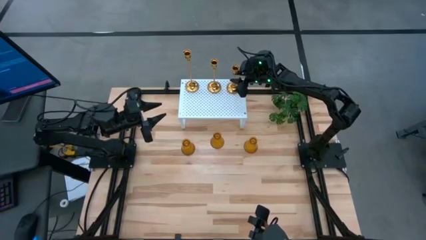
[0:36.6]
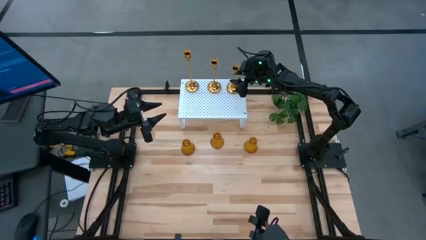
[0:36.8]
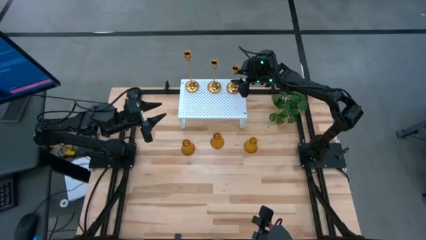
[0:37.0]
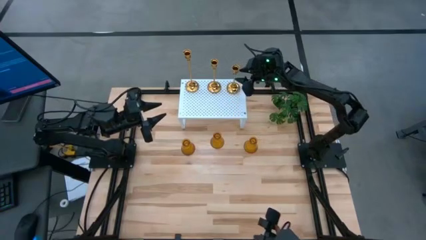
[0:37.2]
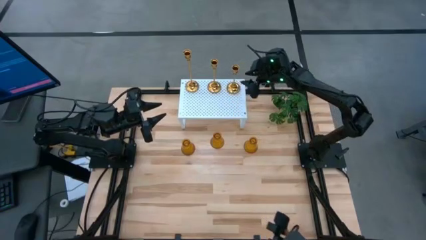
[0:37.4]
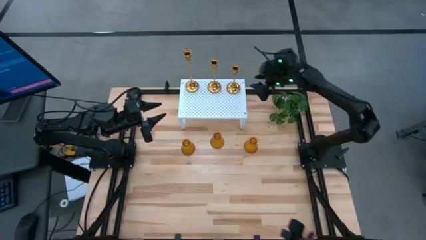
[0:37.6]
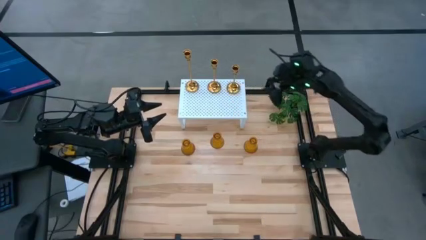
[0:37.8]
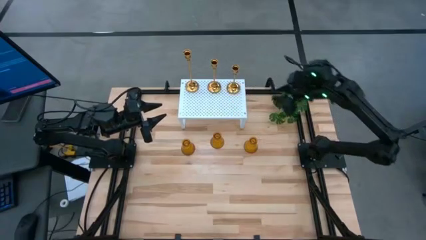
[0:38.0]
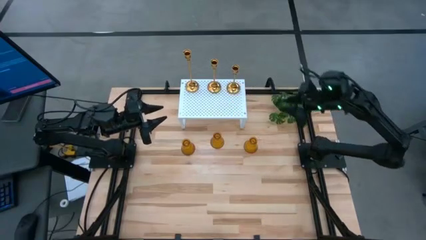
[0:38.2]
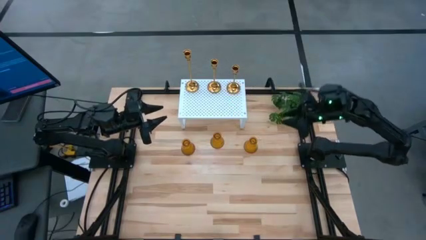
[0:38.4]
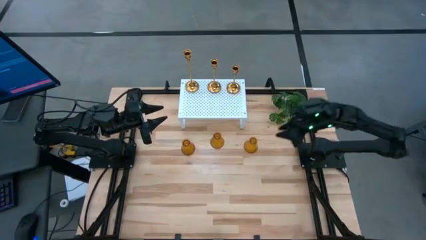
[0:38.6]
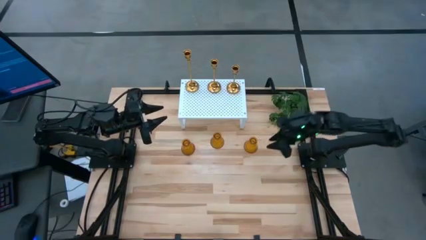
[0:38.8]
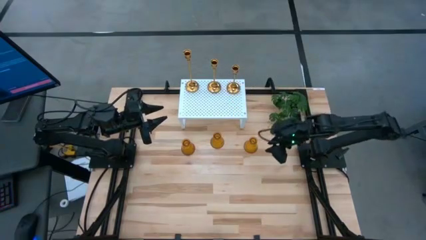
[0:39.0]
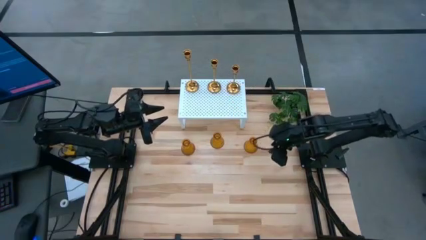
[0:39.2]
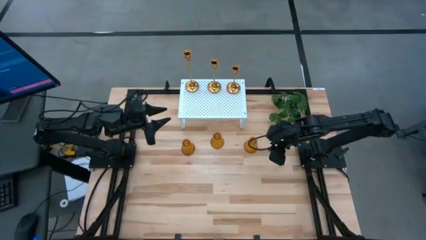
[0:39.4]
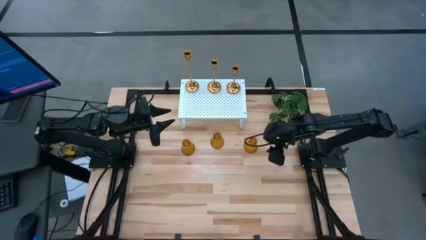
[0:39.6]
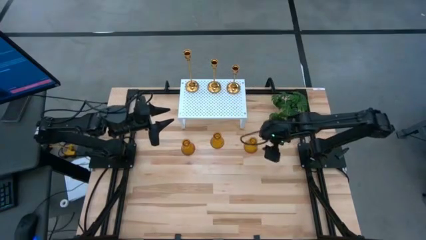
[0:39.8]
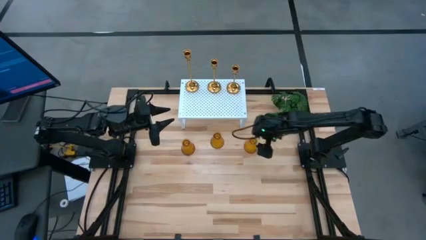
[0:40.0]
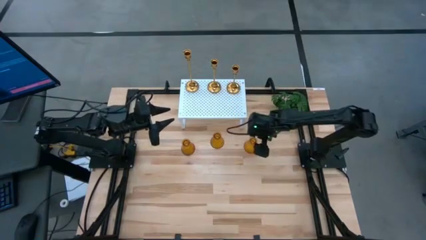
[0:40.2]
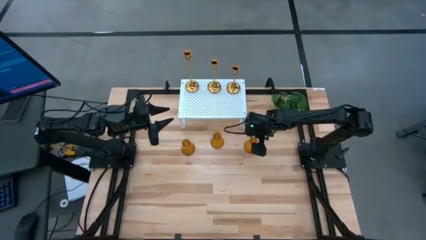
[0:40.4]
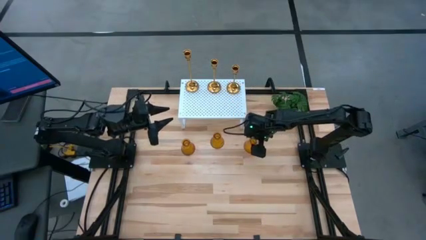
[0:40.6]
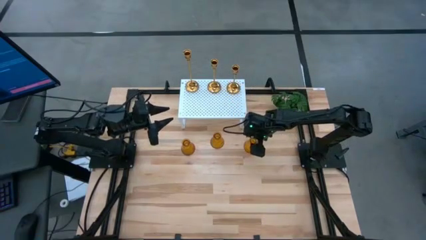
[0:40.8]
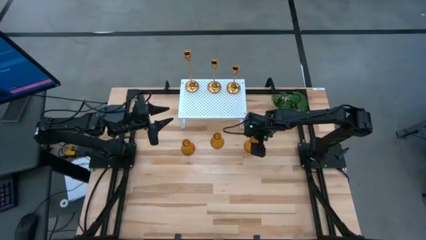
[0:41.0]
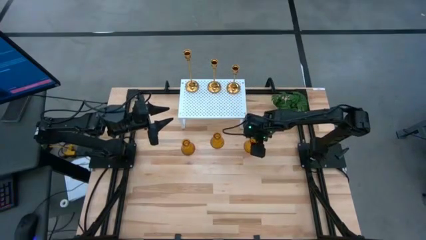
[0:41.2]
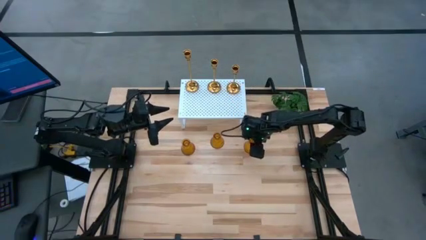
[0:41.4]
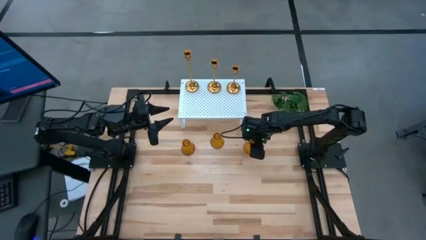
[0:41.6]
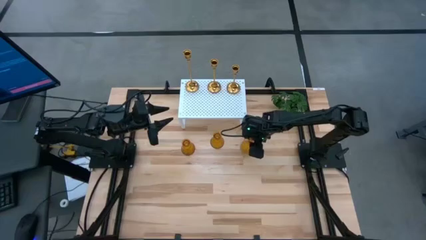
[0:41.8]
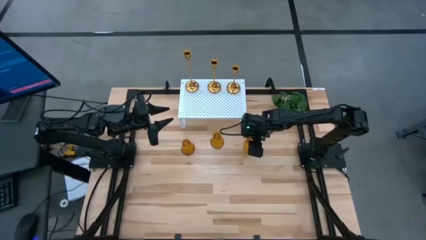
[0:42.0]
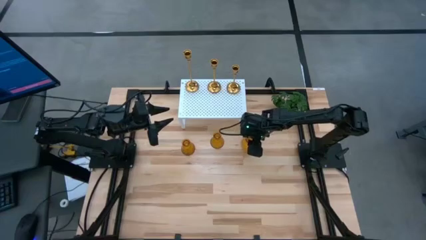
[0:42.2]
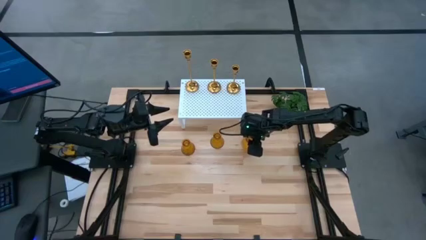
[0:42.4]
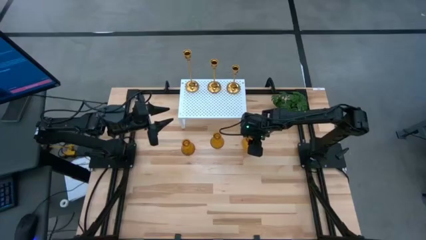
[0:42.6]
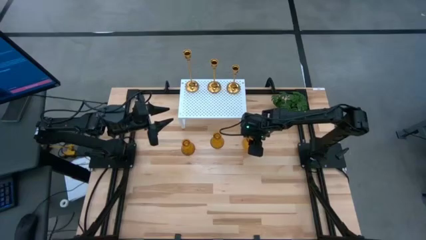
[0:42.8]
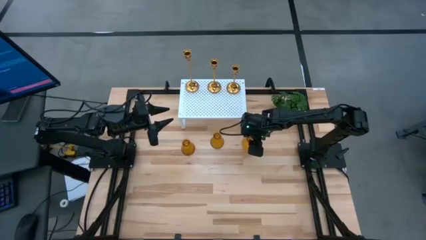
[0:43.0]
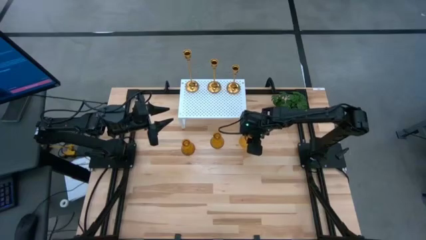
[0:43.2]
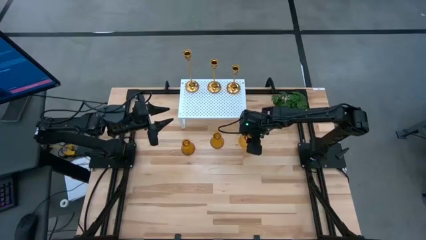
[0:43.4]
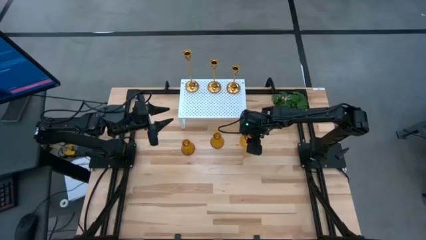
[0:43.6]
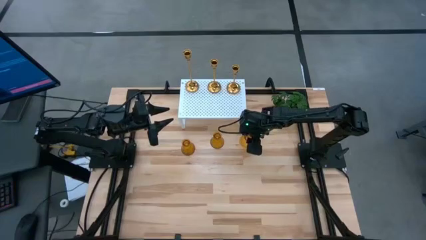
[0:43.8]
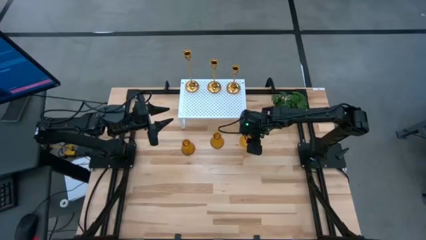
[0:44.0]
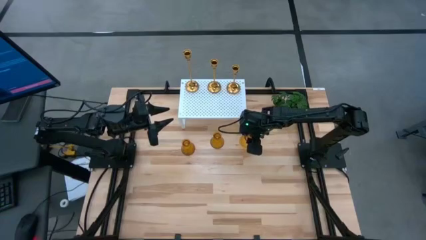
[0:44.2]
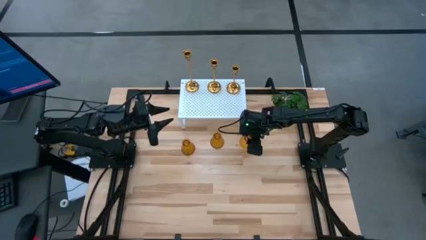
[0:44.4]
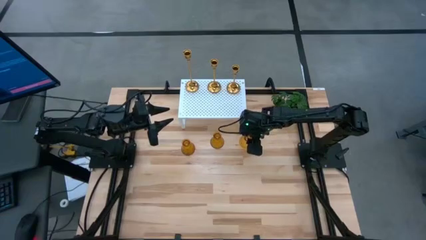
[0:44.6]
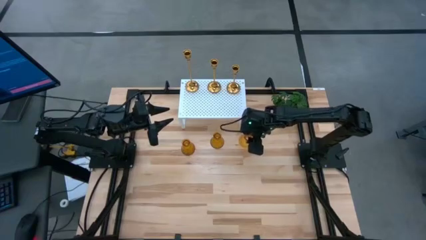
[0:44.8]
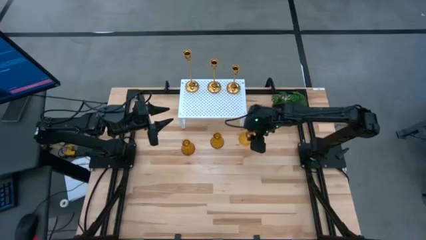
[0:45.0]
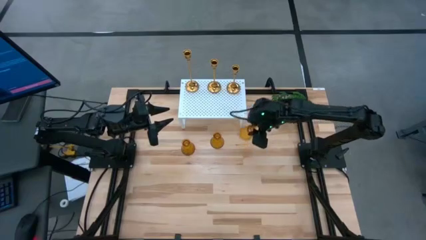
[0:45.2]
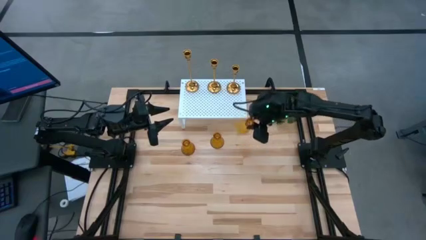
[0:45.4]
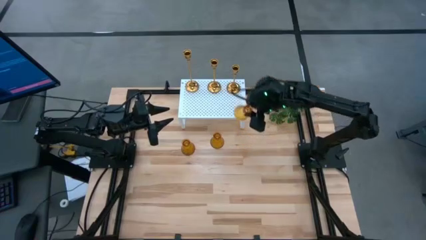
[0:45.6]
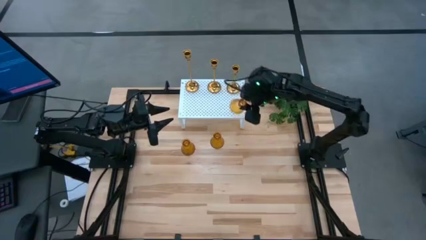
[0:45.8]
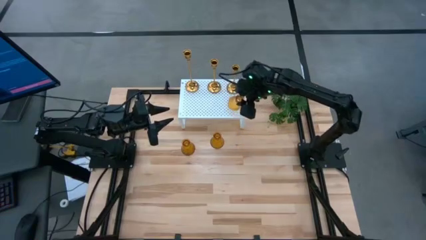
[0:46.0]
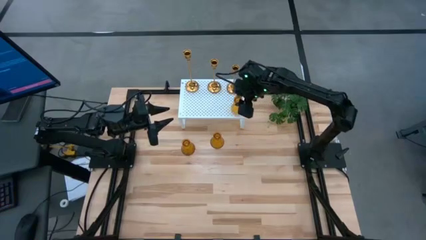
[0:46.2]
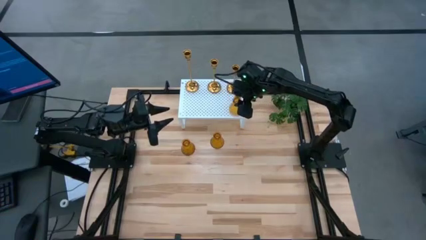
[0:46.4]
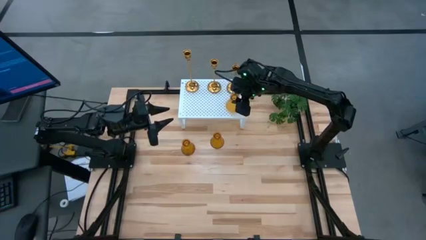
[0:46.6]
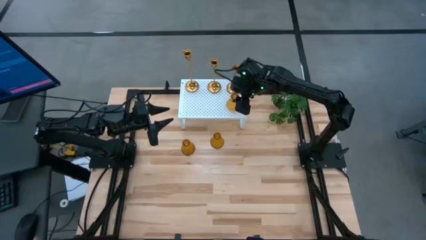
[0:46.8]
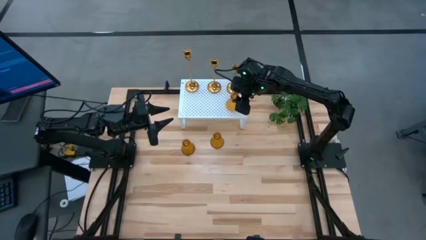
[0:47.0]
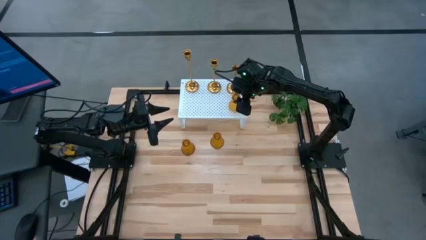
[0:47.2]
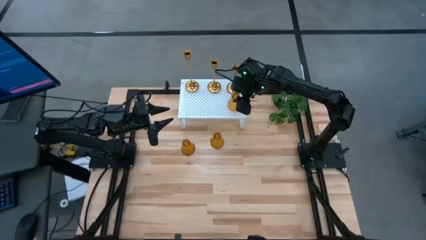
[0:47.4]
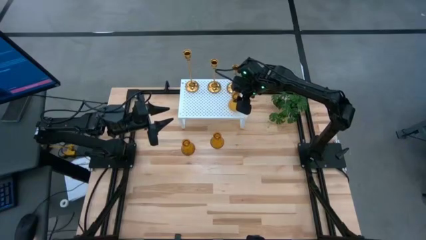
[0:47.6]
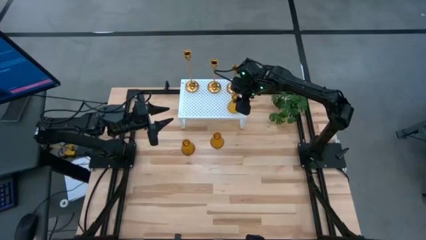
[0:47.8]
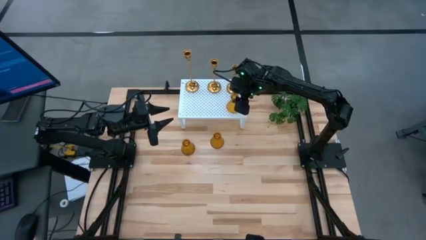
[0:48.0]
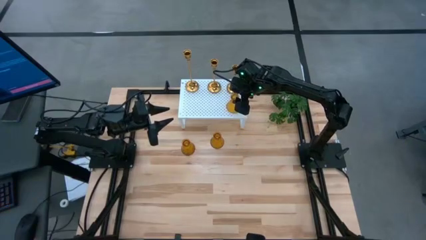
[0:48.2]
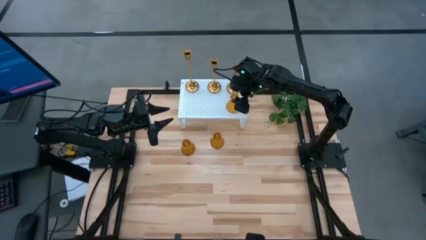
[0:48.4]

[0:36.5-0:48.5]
Task: Pick & Place candle stick holders
Put the right yellow glass candle holder on the shelf

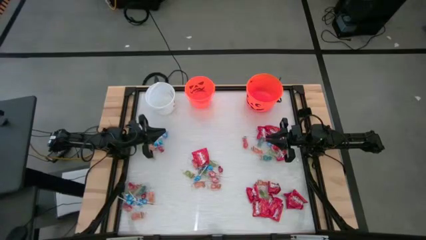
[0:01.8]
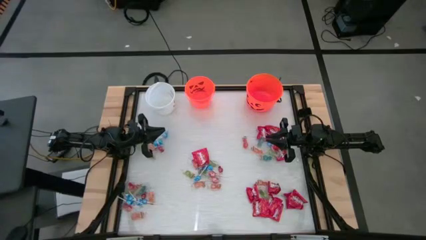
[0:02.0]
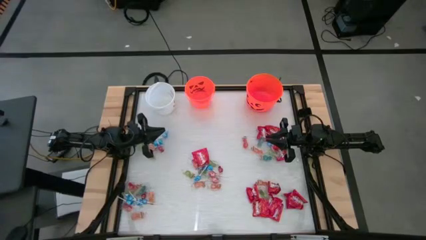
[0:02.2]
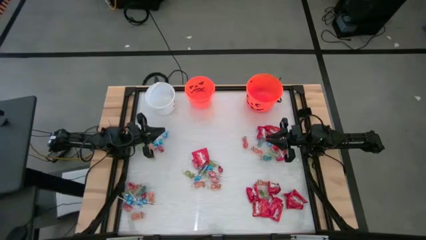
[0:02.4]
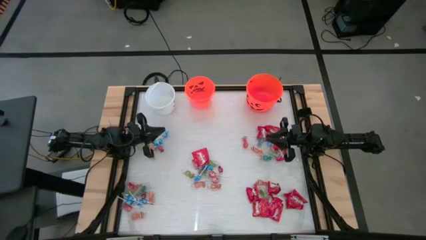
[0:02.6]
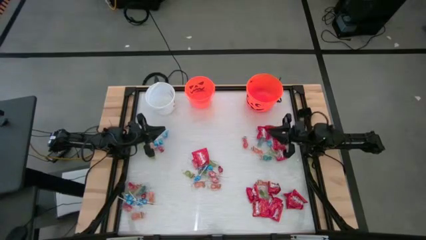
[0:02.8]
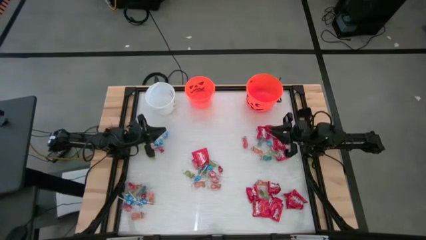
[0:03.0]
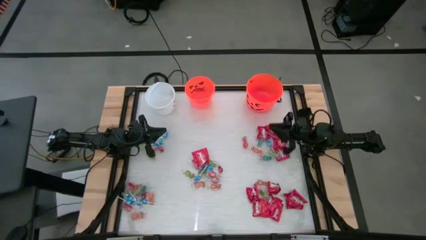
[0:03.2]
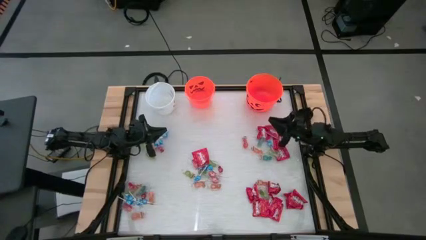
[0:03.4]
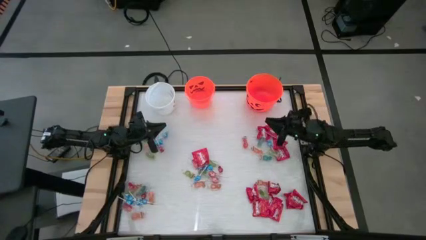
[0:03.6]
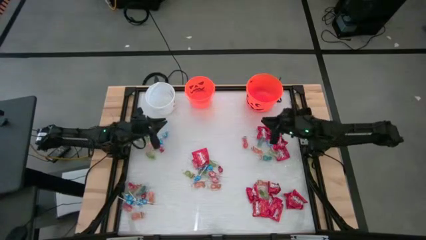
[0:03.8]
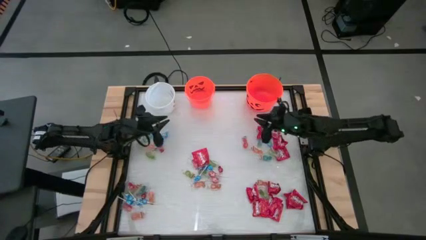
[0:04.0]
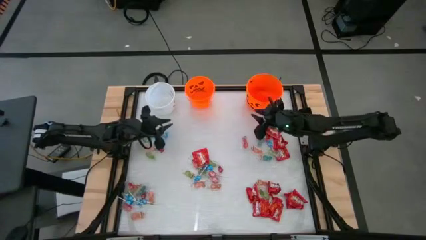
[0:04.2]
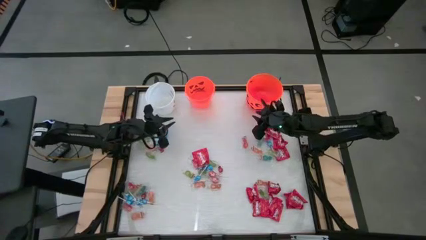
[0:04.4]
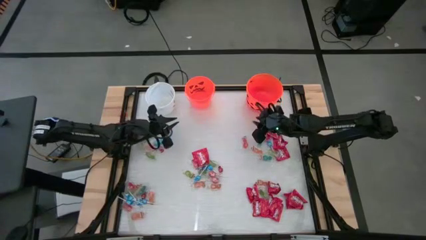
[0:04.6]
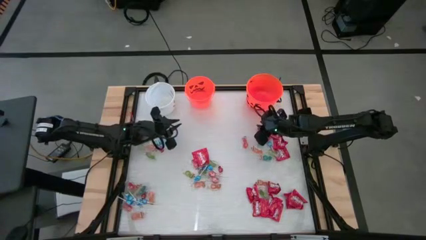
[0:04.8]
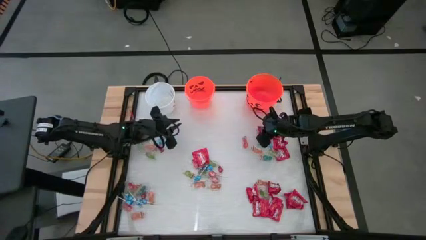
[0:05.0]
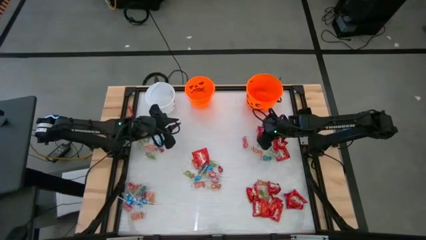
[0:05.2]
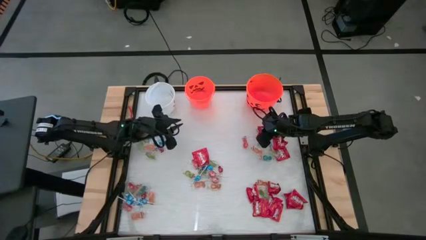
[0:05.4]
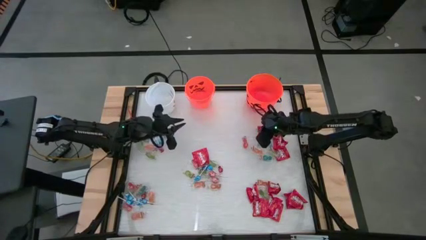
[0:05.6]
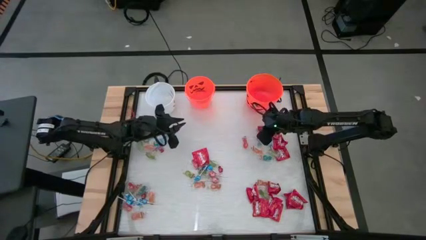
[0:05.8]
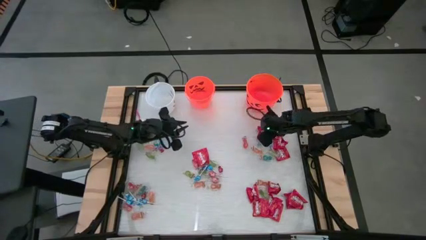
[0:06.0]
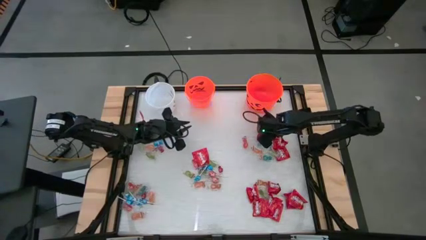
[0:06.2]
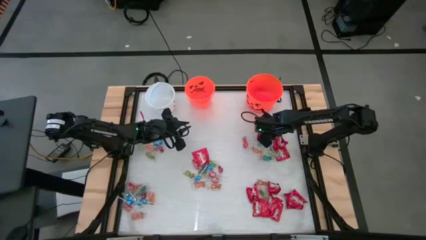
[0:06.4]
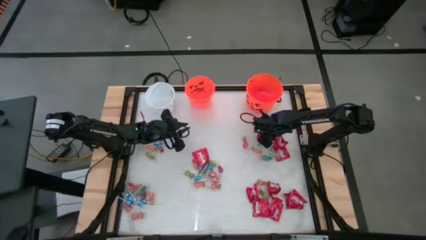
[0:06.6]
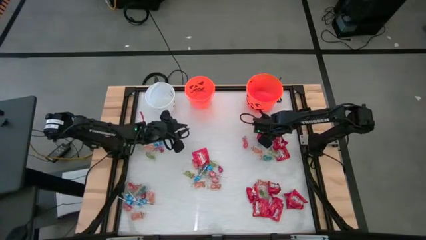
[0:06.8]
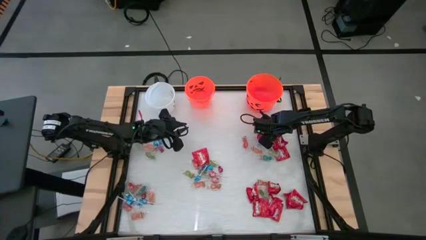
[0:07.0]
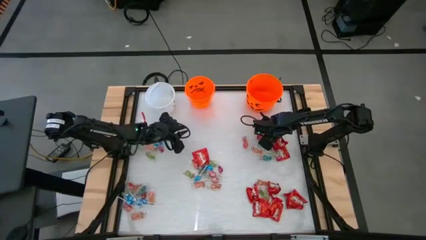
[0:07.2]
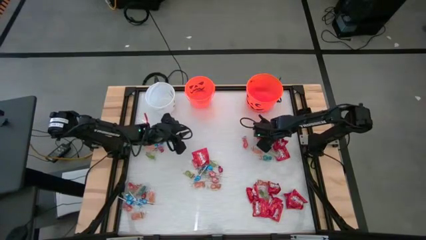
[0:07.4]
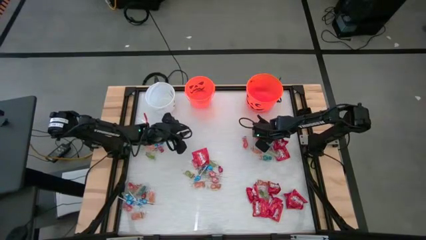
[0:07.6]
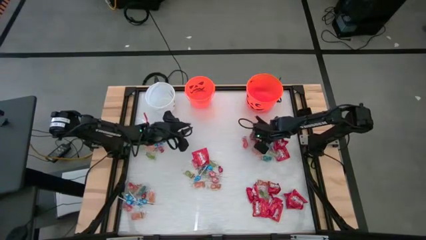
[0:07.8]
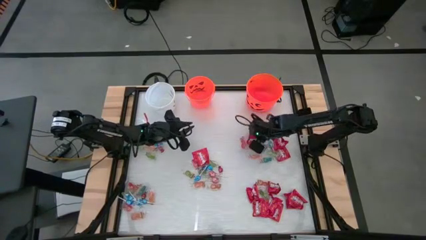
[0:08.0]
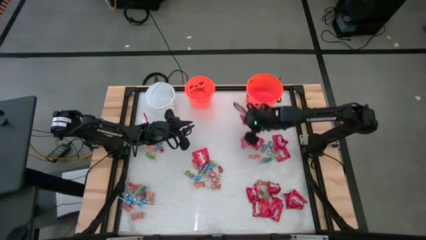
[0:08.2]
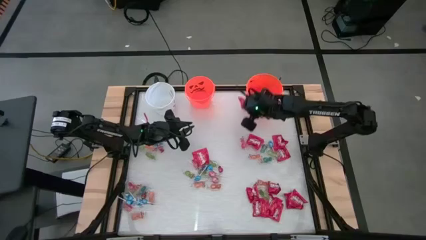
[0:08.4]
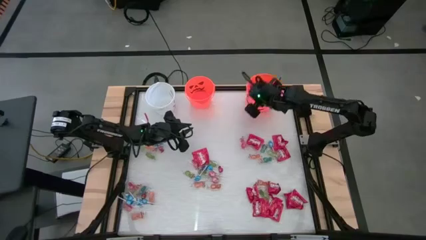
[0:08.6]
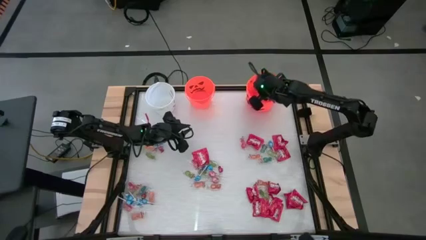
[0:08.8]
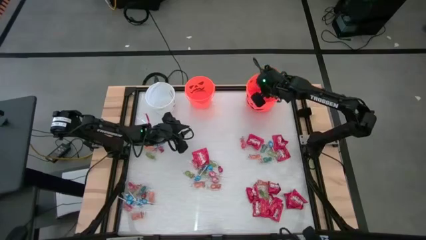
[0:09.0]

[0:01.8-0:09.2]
Task: Sort candy by brand, put in halloween buckets
Put the red candy into the right orange bucket
